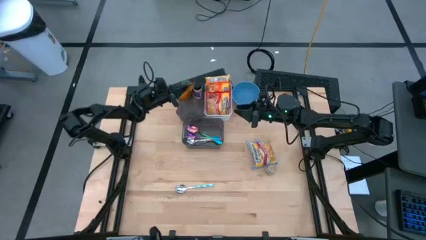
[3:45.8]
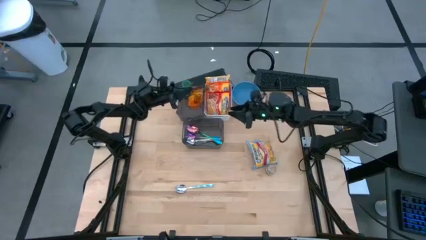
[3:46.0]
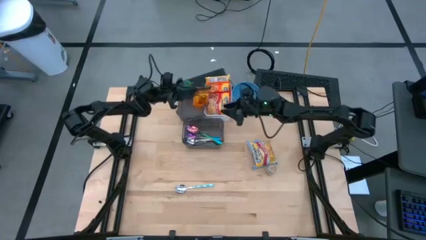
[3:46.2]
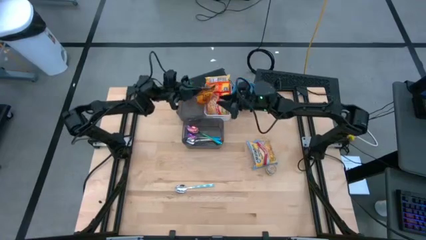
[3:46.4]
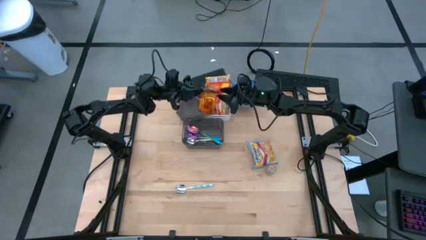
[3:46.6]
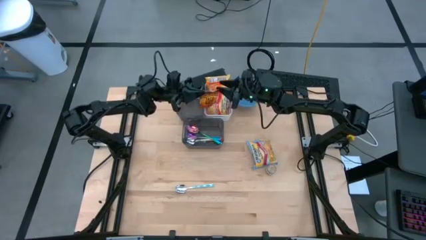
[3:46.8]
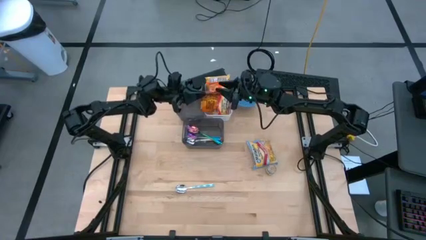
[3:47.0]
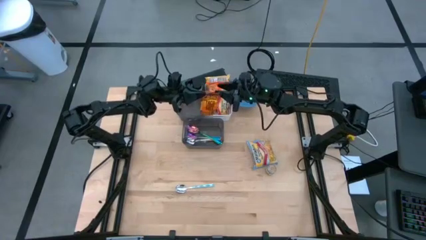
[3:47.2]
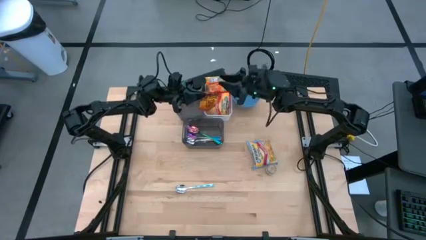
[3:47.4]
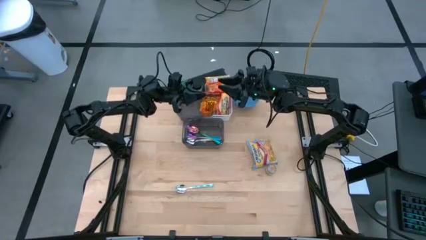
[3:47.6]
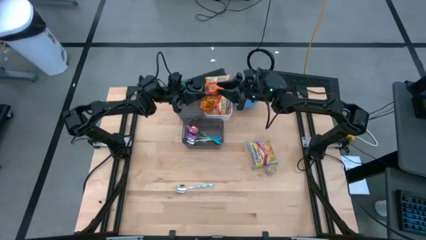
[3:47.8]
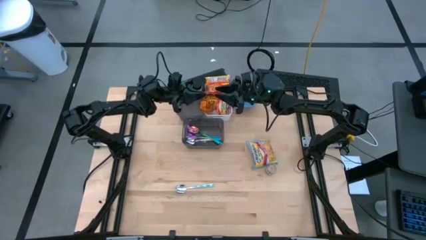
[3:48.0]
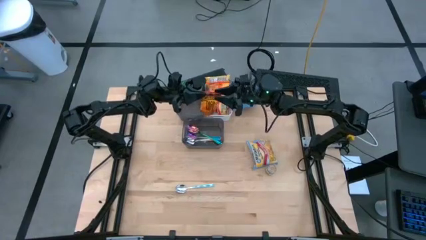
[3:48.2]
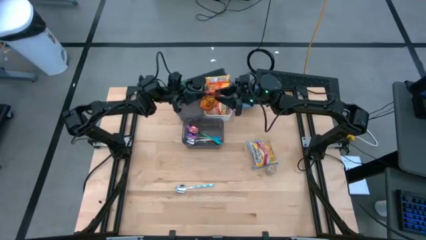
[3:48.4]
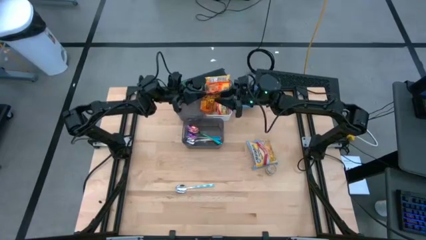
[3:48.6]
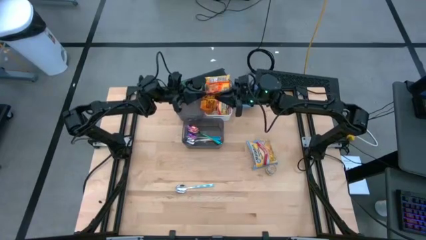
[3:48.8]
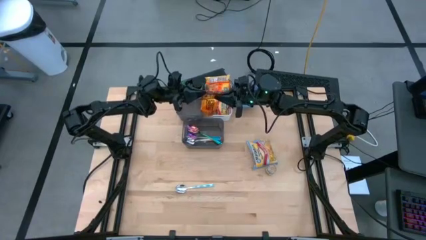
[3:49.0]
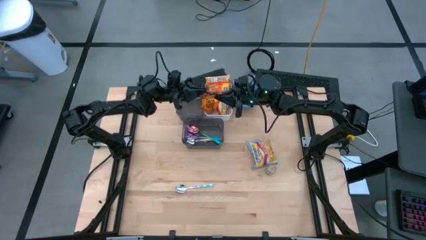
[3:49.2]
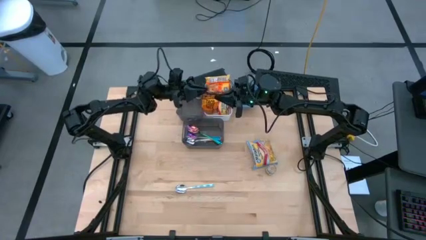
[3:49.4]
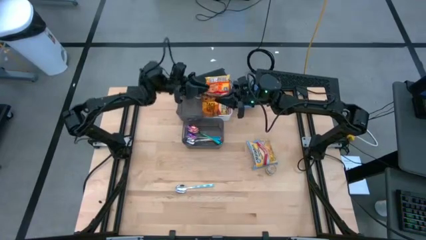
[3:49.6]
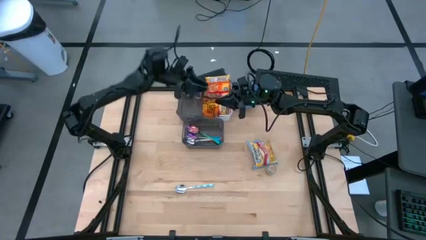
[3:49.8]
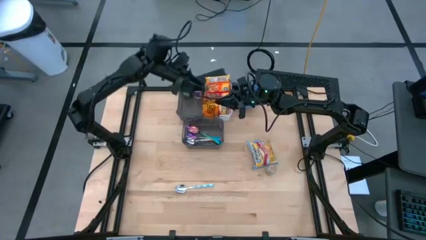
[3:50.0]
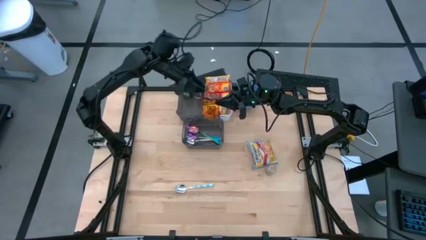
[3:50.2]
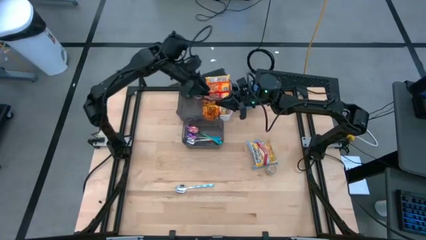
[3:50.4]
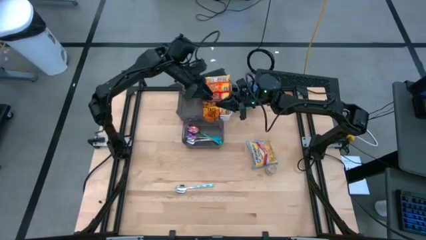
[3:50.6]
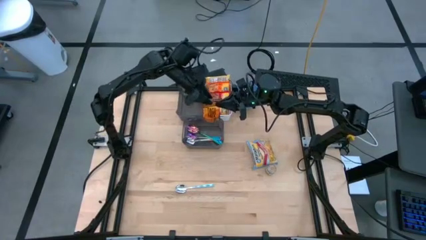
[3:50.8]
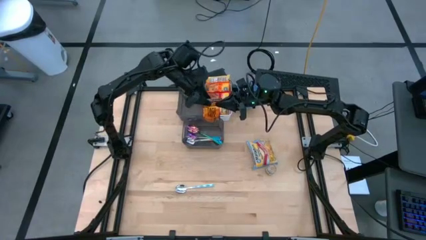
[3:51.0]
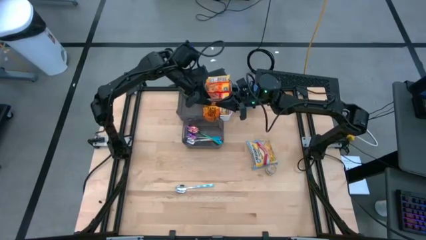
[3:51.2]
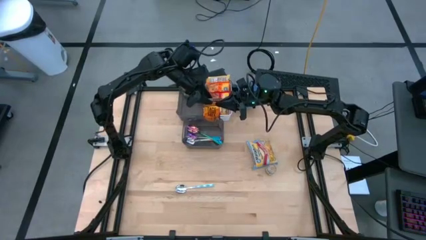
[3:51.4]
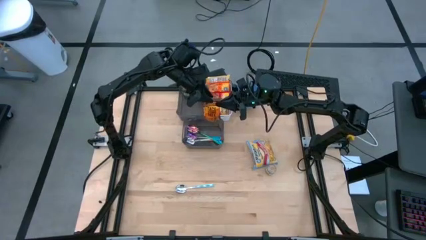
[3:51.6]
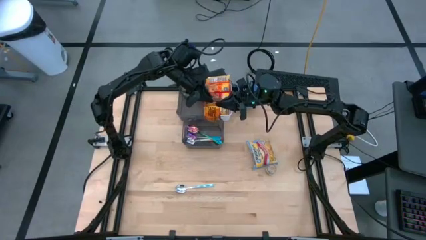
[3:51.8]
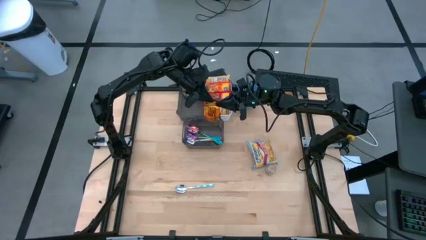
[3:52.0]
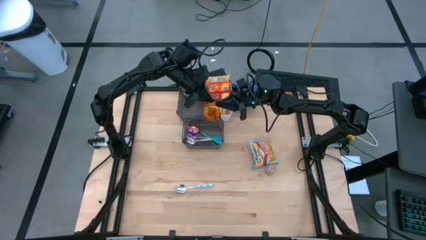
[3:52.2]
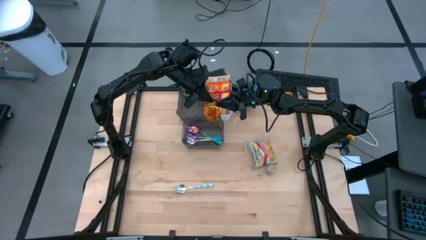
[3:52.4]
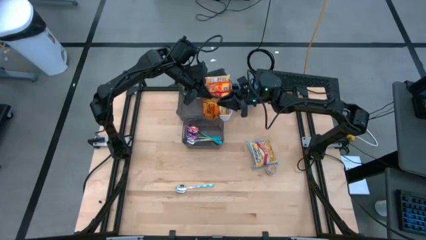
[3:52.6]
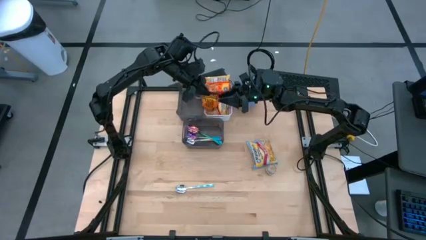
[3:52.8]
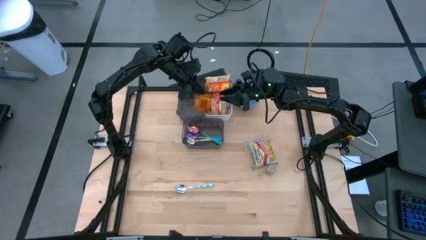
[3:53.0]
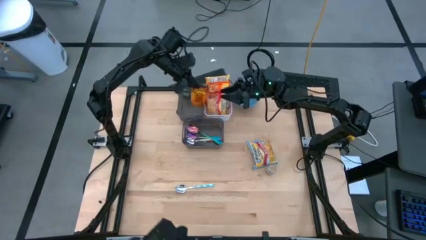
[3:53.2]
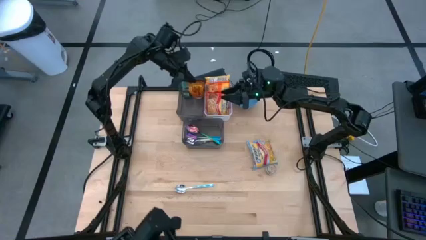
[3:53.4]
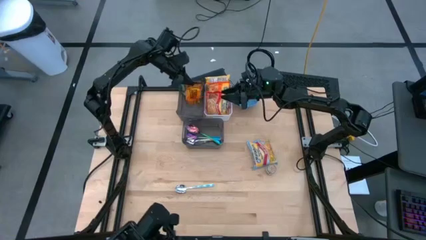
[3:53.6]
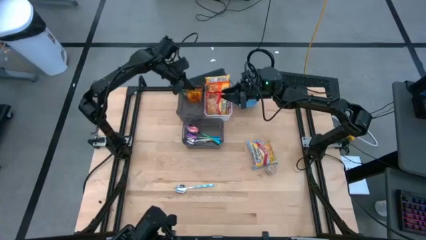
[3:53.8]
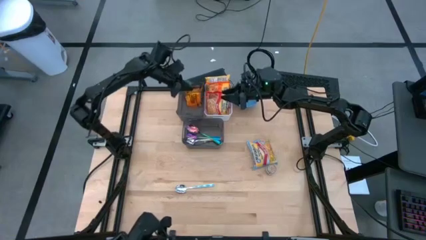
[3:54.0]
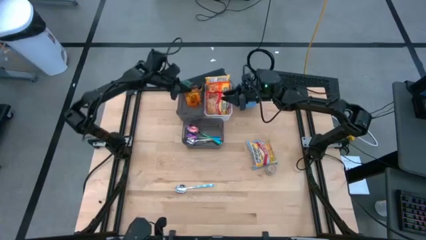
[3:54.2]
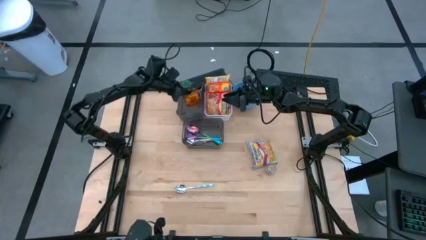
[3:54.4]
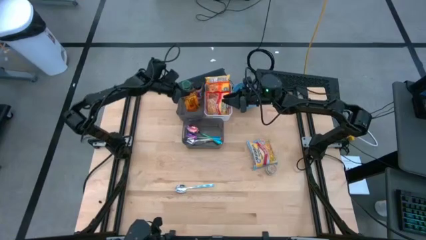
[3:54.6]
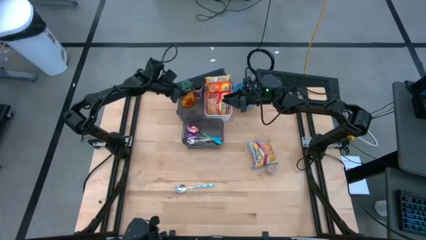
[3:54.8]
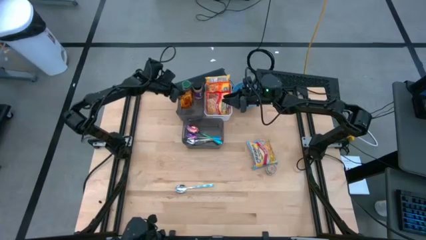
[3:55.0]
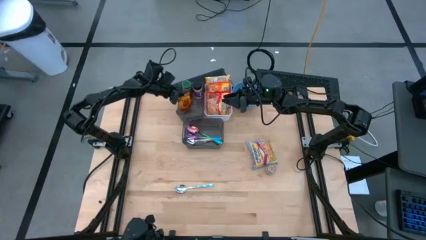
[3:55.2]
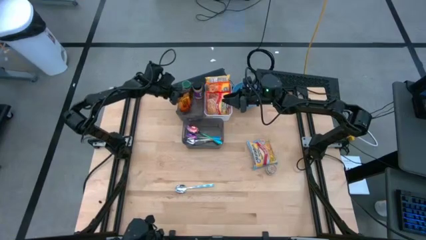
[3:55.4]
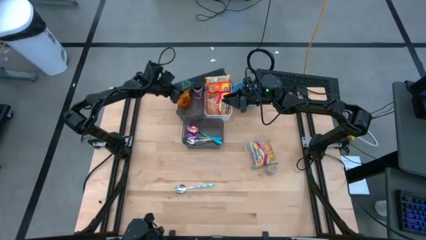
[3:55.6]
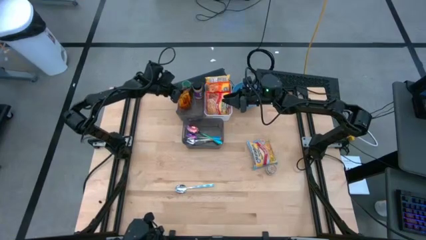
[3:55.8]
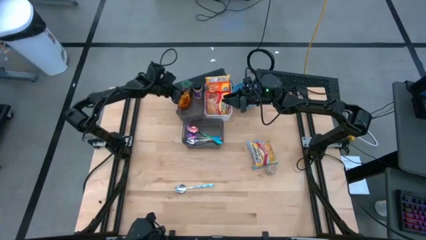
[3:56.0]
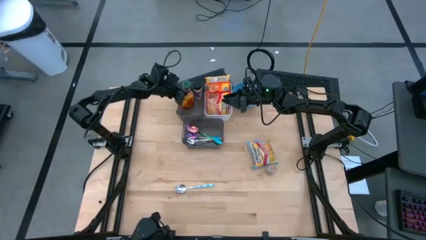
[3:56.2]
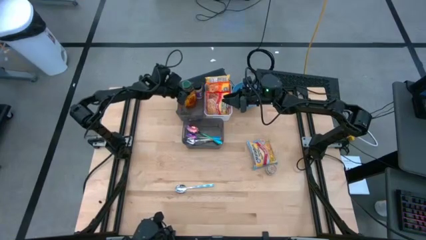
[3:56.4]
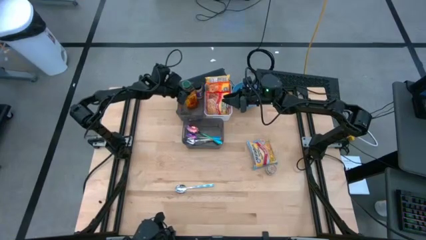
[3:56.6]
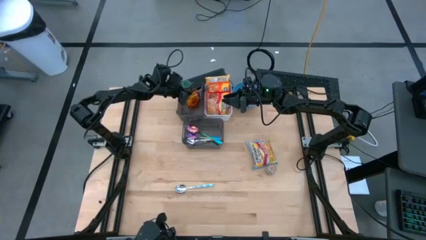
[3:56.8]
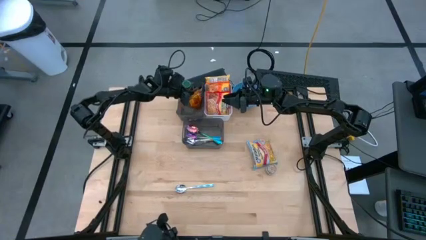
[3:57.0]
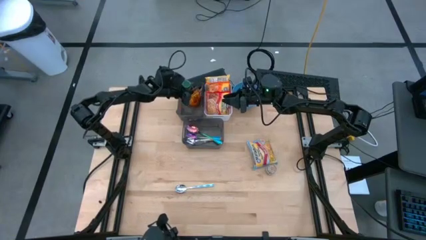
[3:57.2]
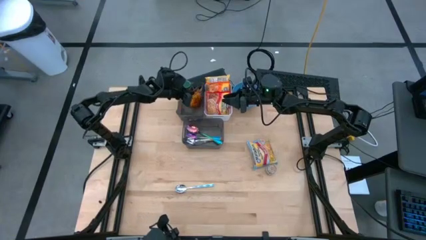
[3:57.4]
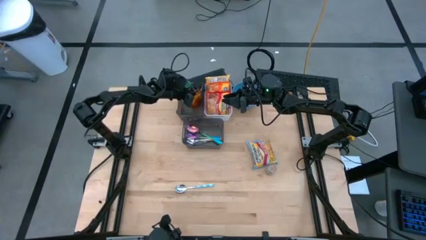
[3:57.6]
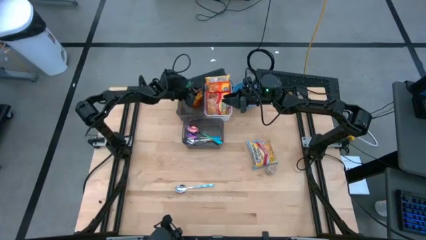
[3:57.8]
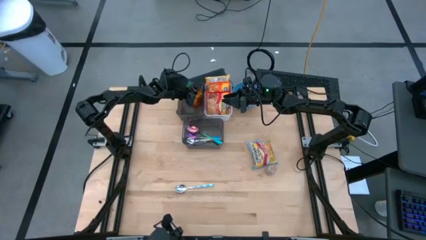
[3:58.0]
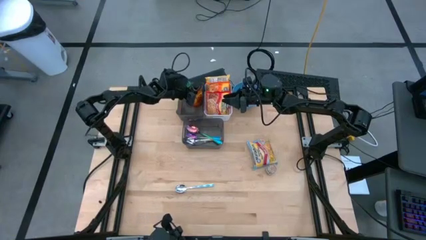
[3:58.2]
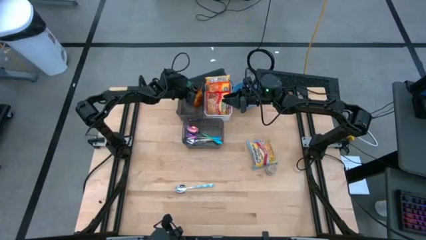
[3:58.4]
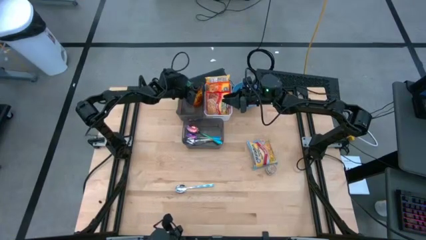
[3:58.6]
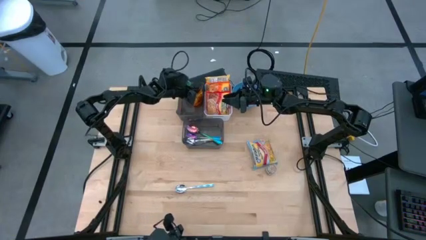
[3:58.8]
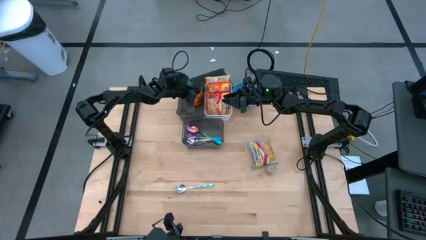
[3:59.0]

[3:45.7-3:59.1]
Task: Pick & Place Food Item
Put the orange seasoning pack into the top black bin
